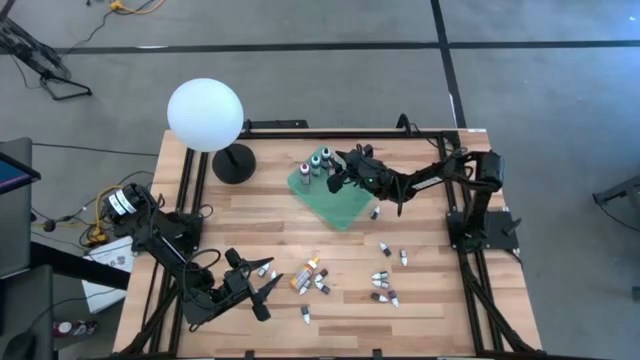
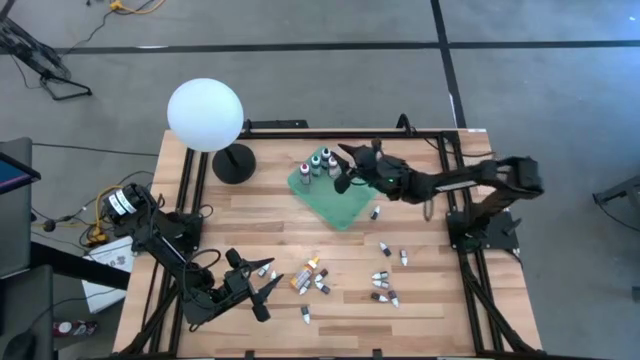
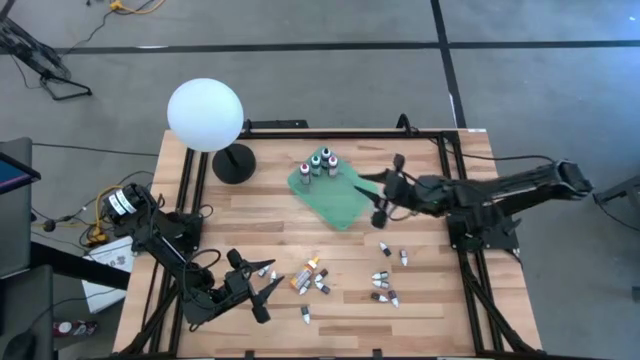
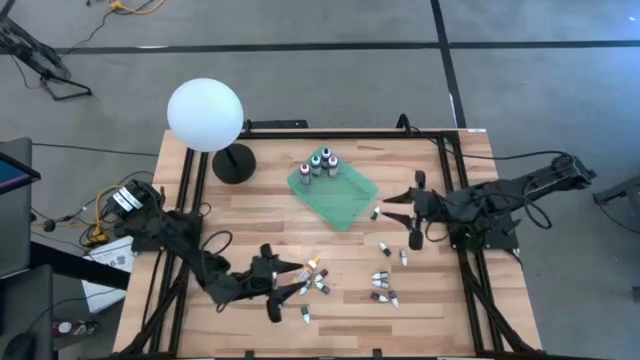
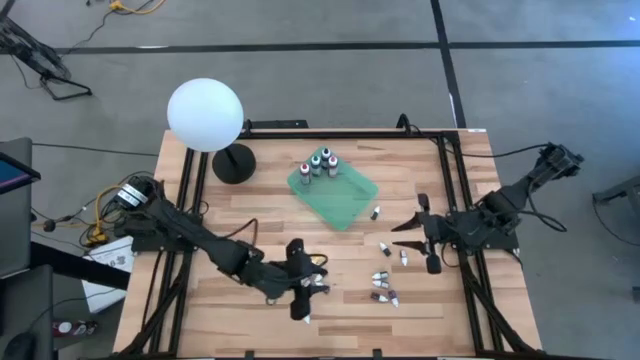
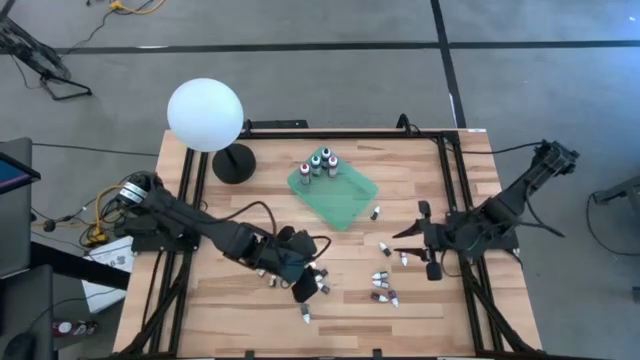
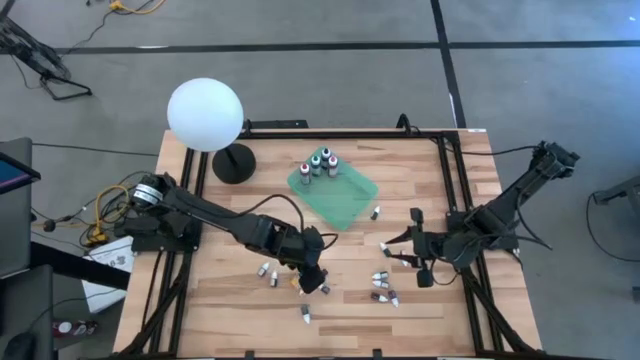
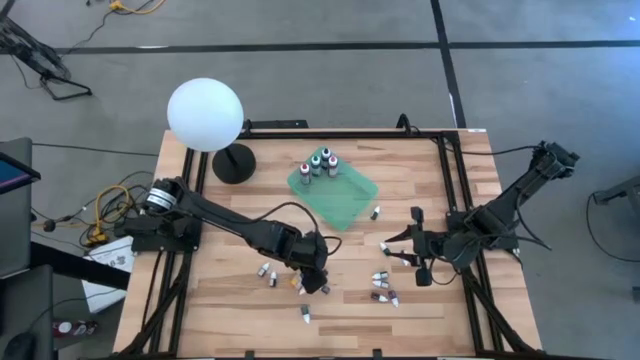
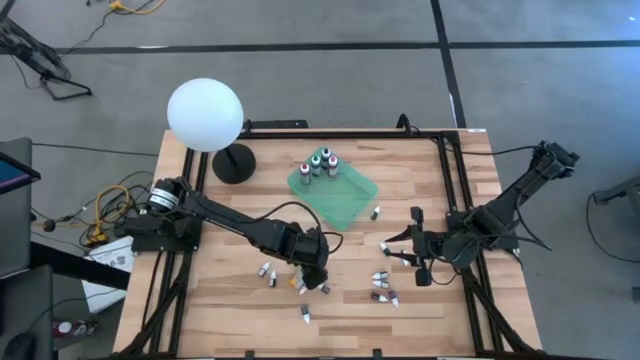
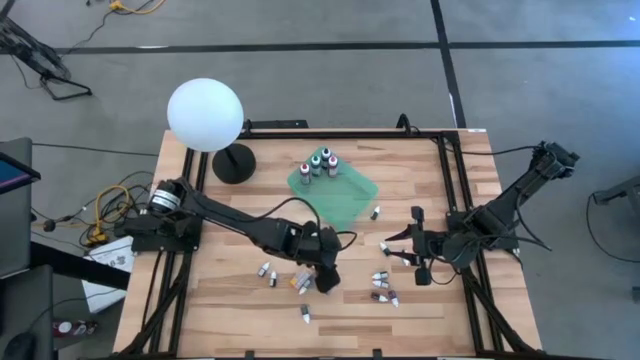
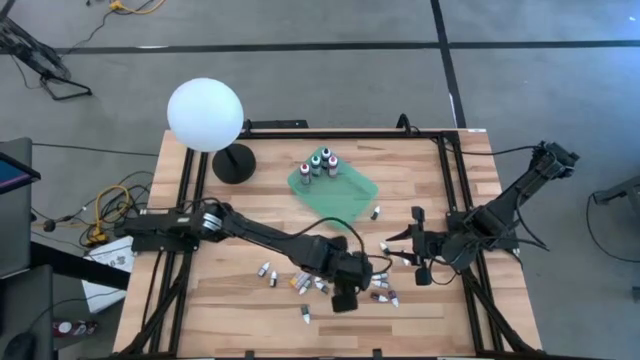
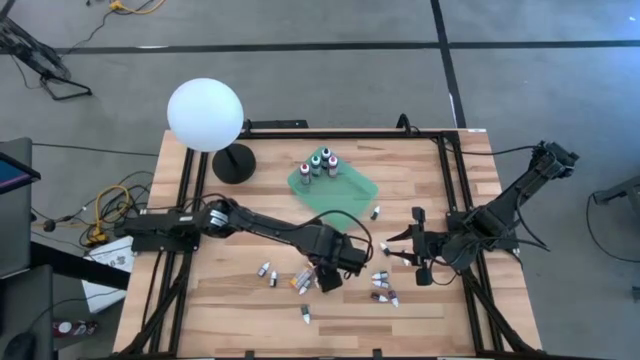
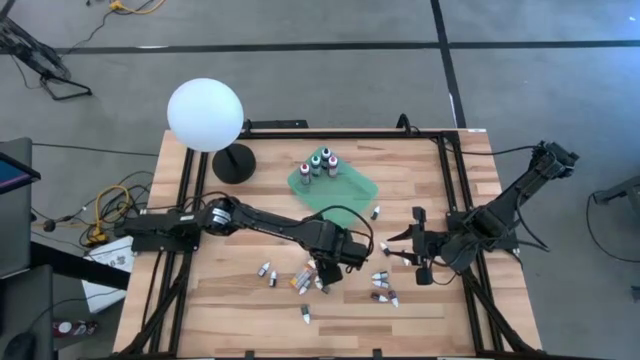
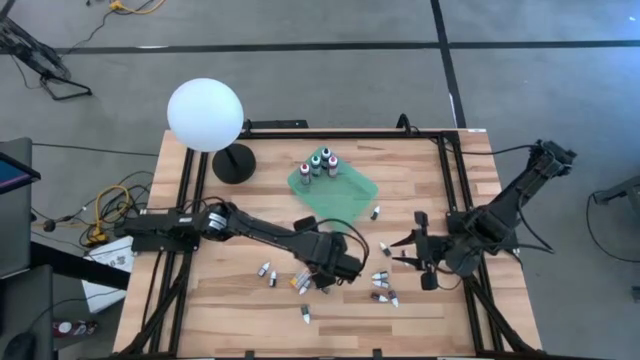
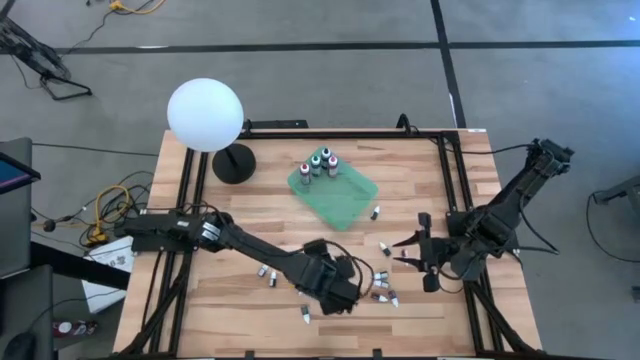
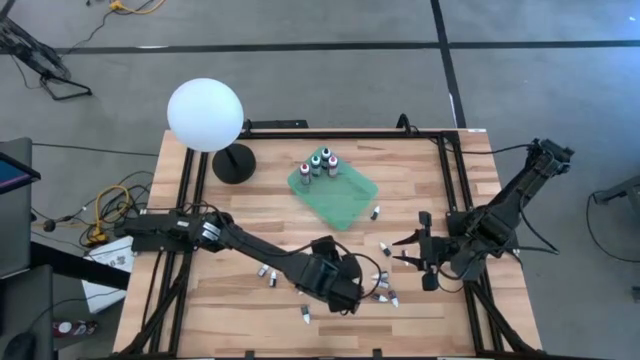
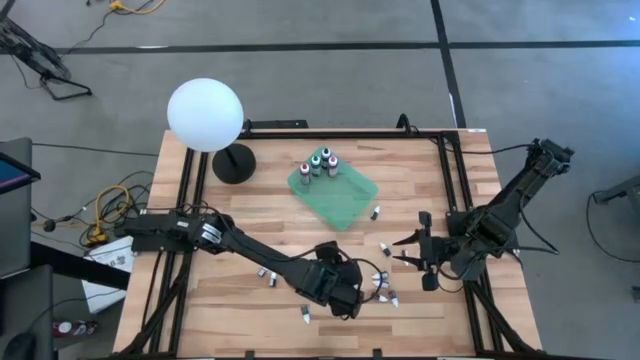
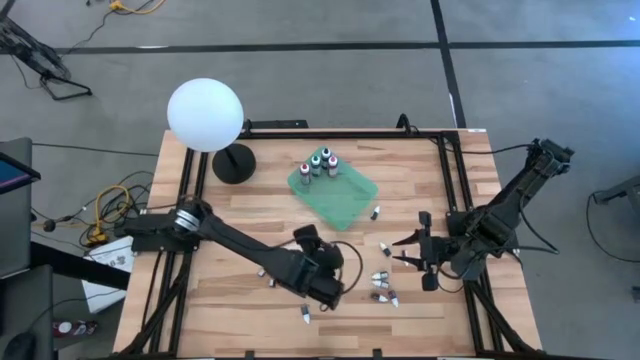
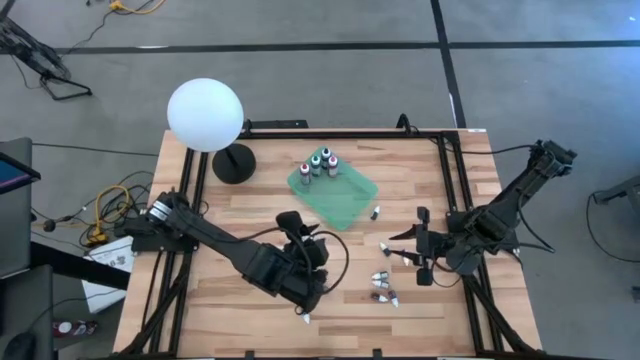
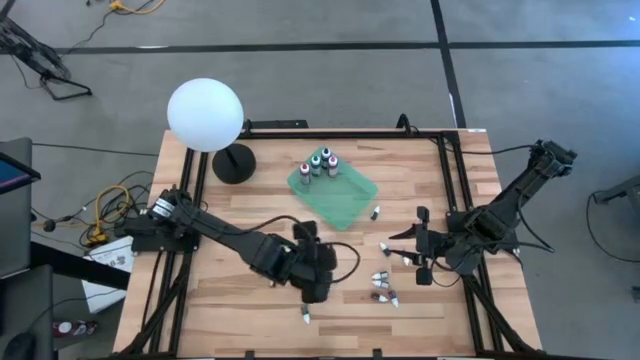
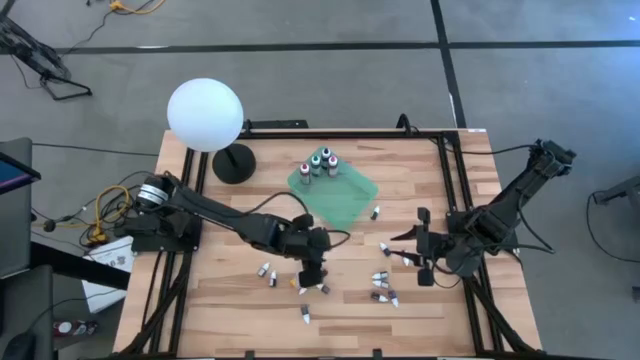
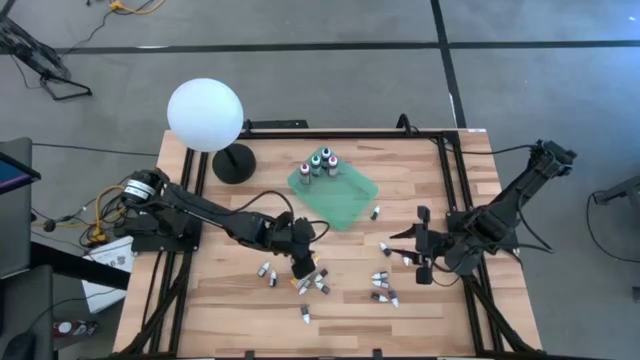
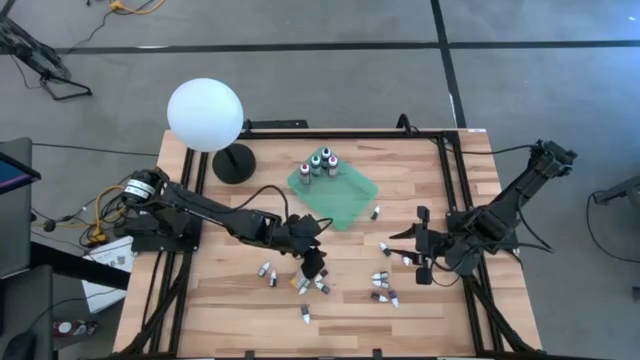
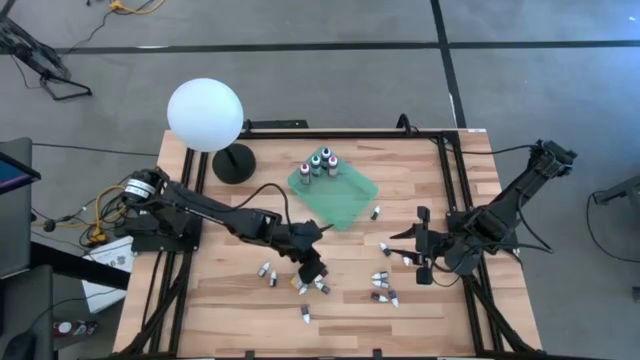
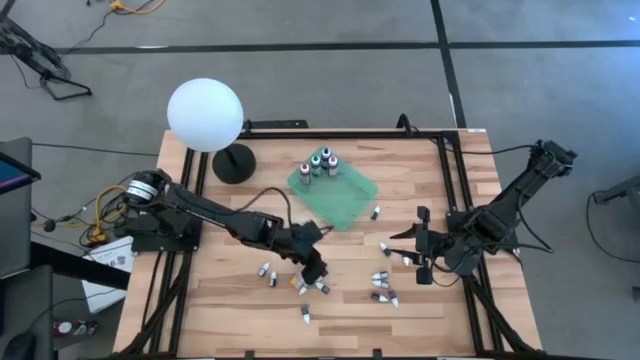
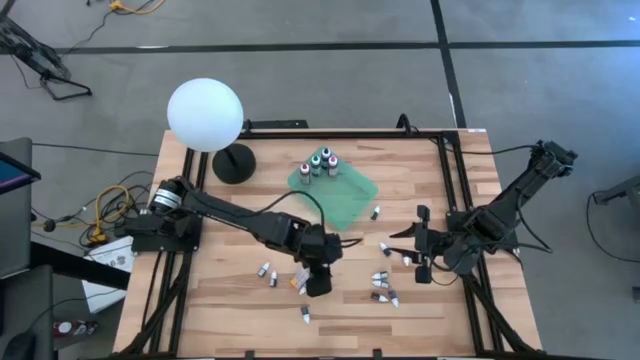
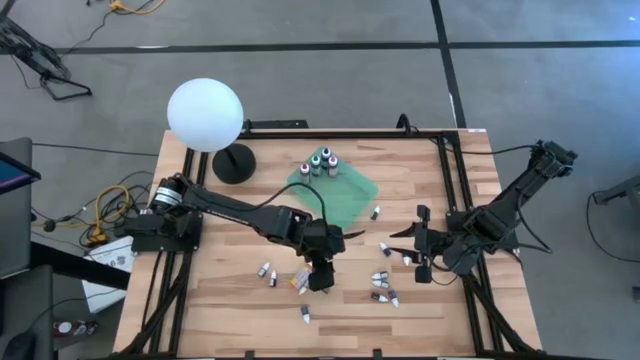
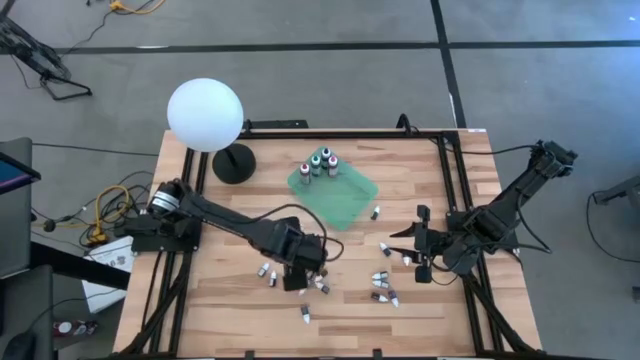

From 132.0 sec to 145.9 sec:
Task: Pick & Place food coloring
Put the yellow food coloring bottle into the green bin

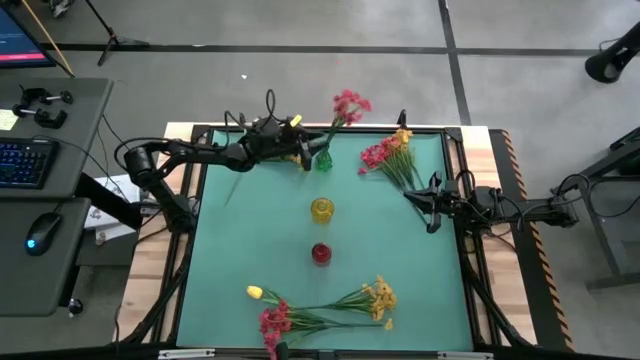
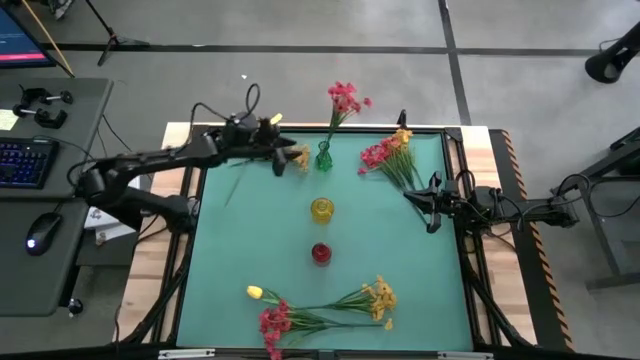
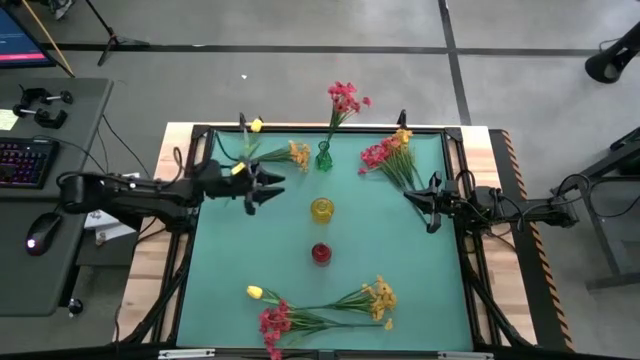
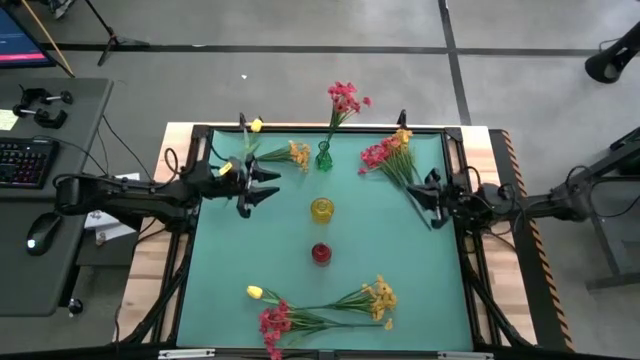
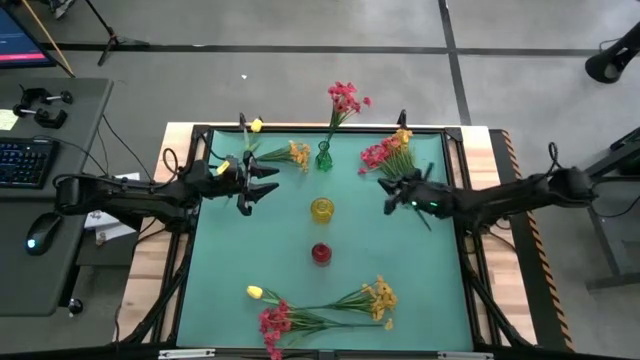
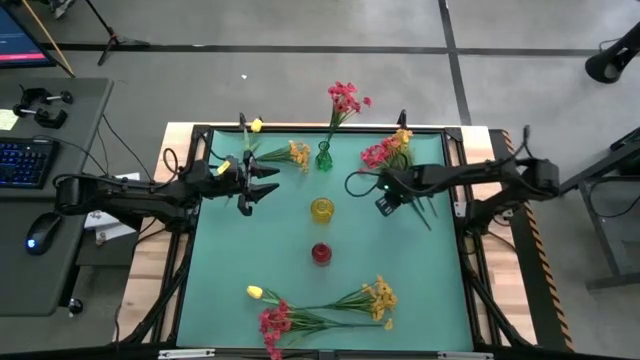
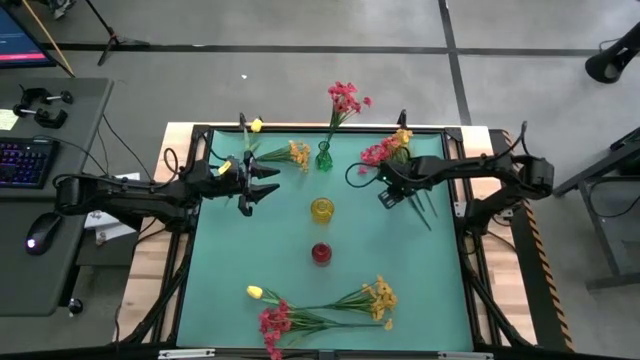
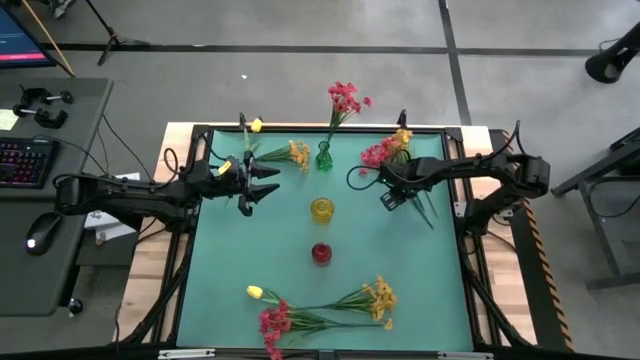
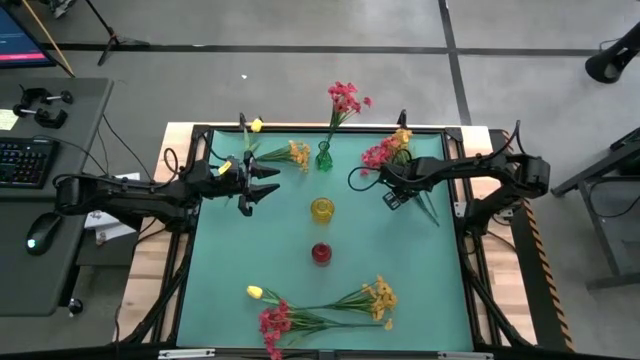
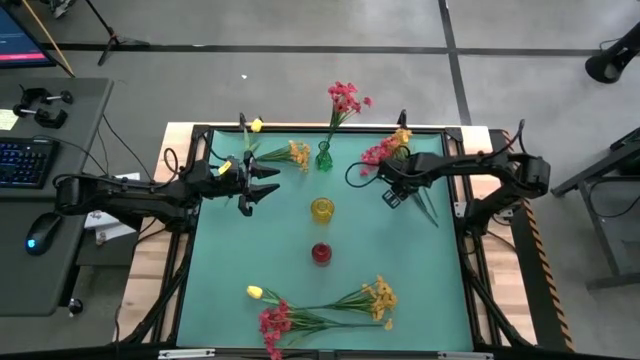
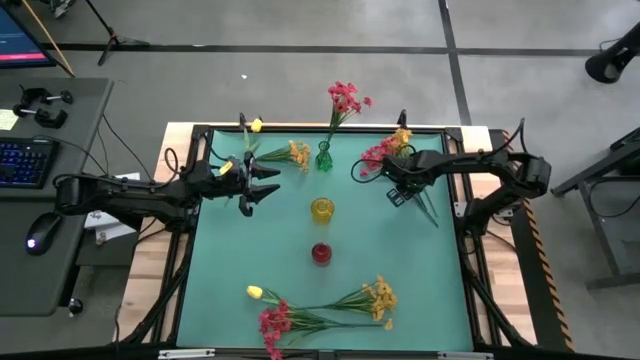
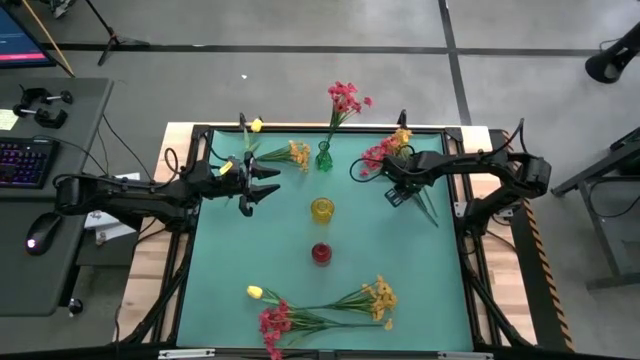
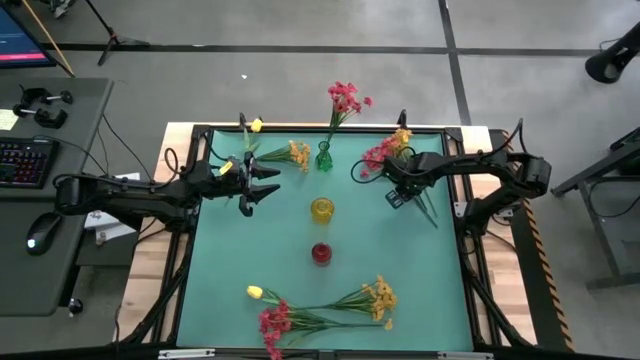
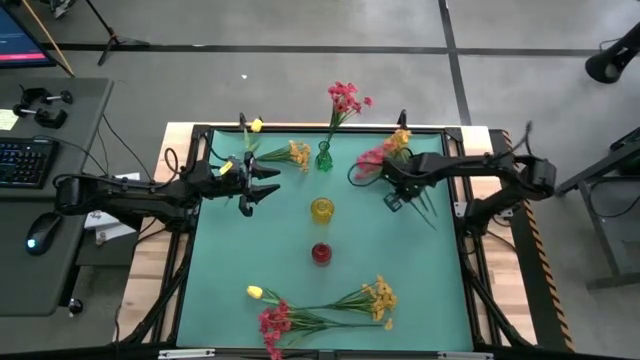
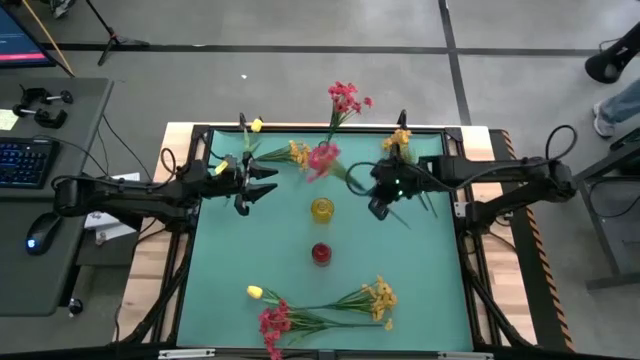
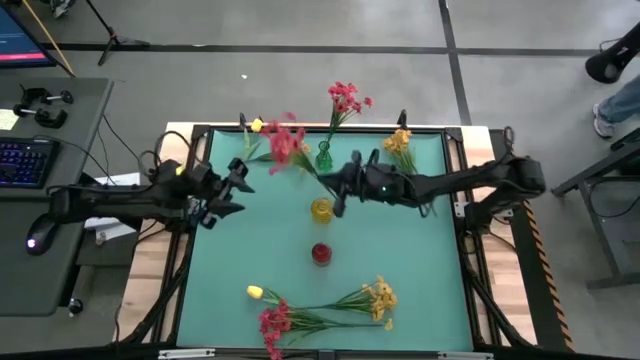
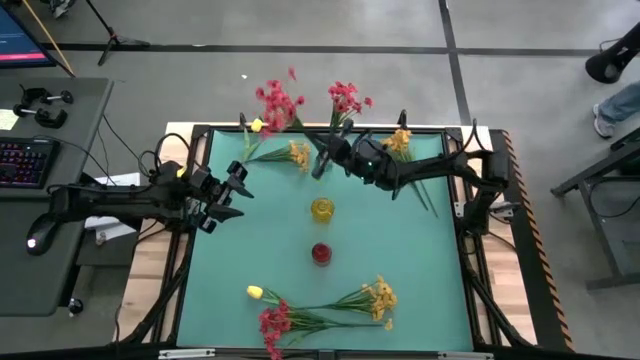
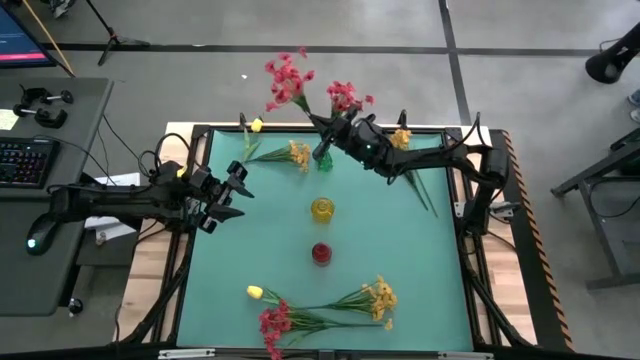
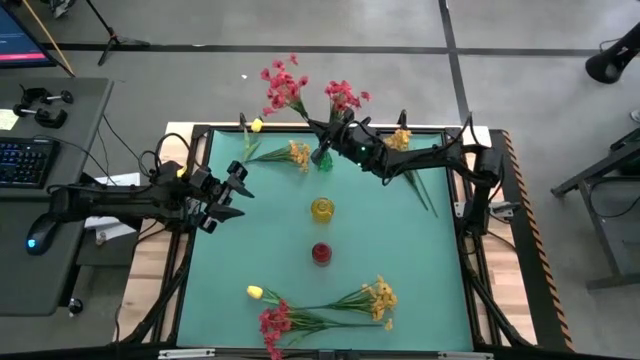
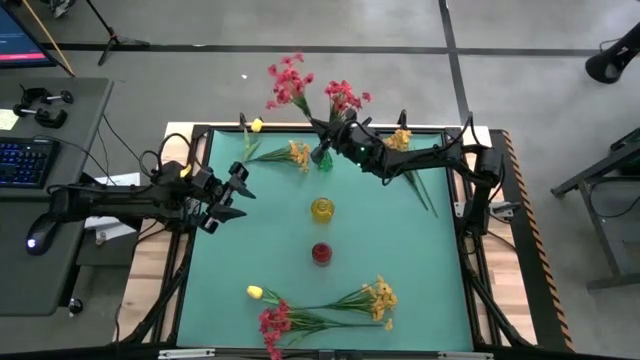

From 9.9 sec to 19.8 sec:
Task: Sort flowers into vase by color
Put the top pink flowers into the green vase
